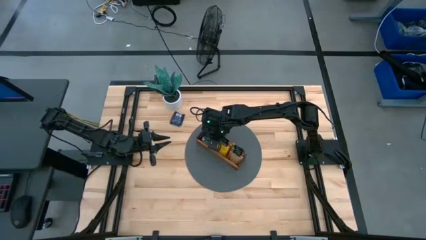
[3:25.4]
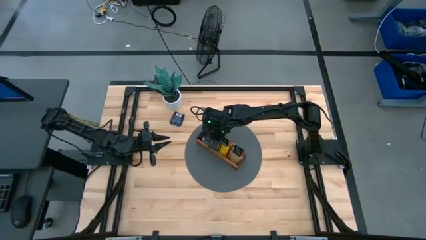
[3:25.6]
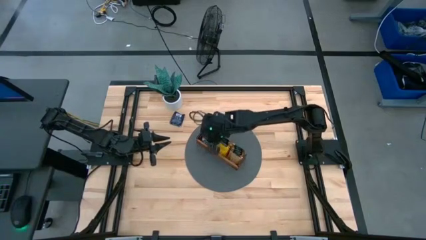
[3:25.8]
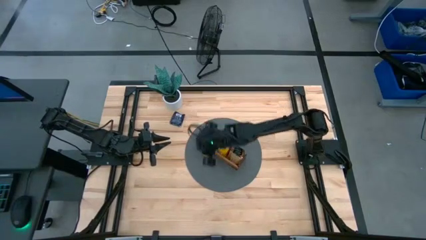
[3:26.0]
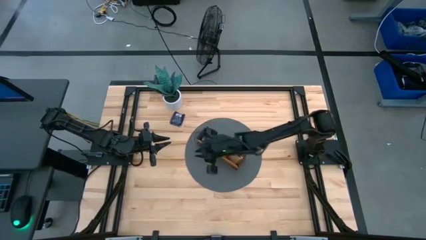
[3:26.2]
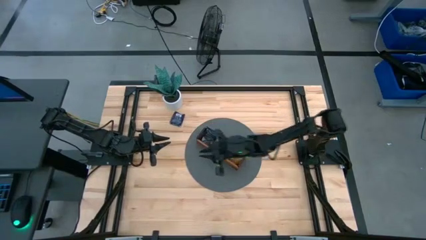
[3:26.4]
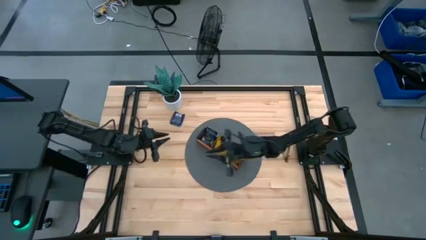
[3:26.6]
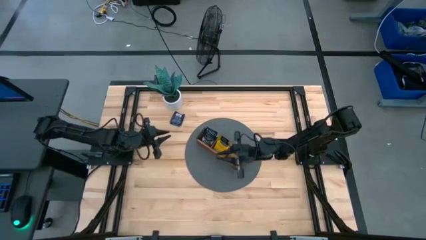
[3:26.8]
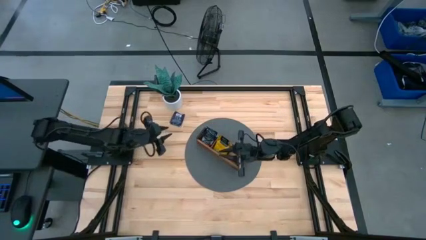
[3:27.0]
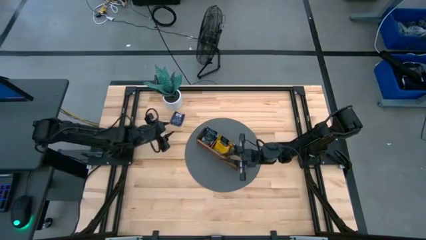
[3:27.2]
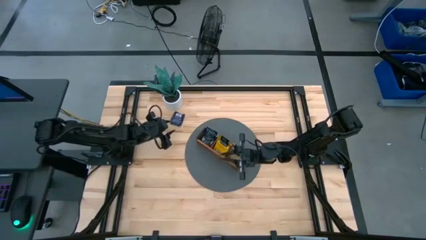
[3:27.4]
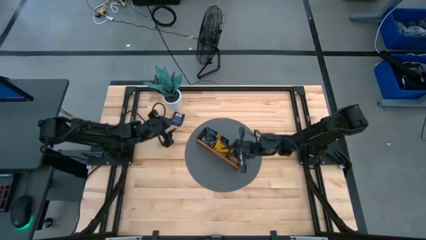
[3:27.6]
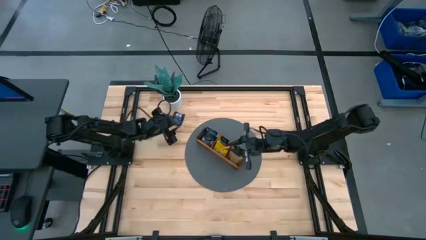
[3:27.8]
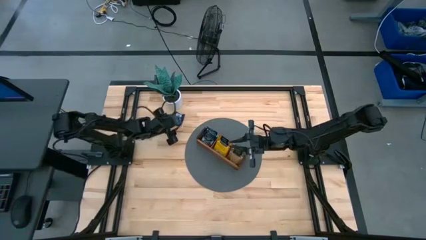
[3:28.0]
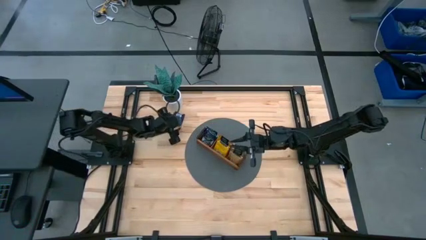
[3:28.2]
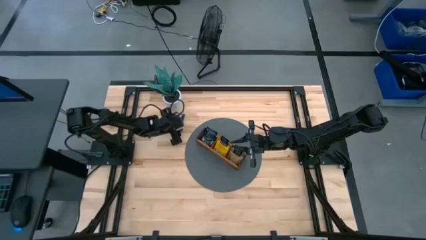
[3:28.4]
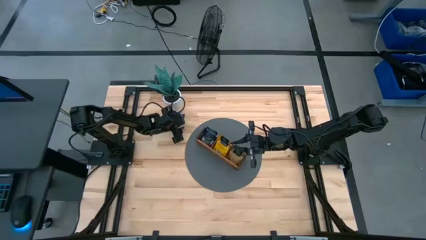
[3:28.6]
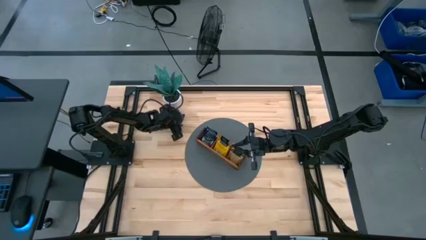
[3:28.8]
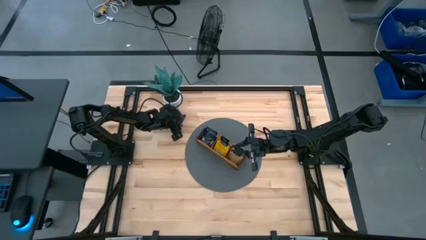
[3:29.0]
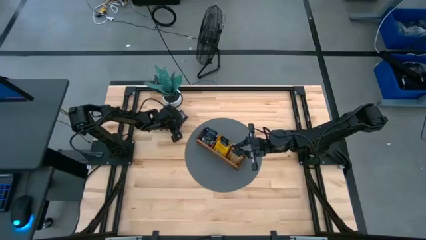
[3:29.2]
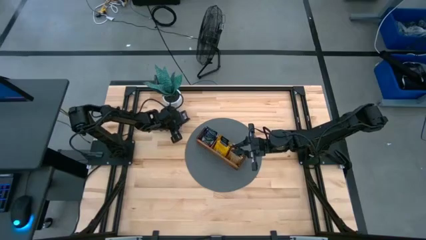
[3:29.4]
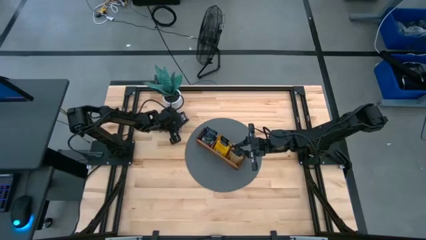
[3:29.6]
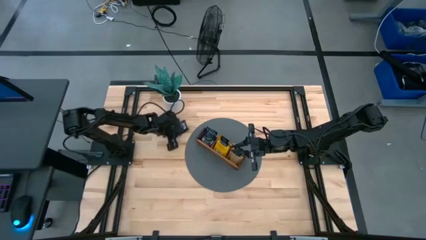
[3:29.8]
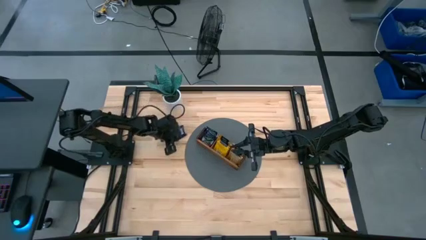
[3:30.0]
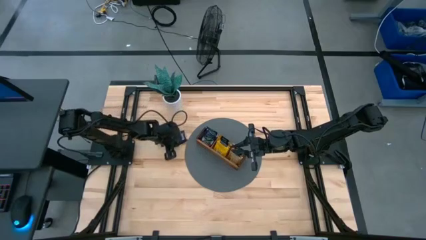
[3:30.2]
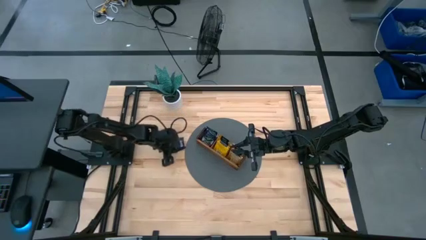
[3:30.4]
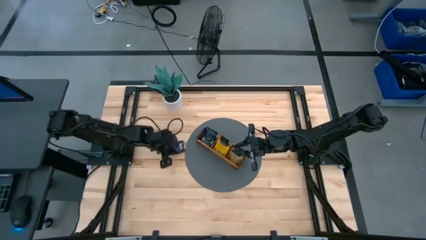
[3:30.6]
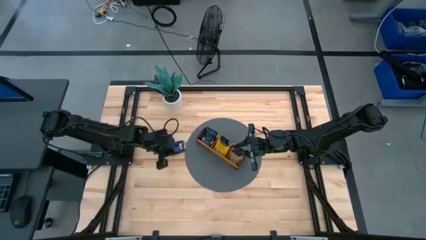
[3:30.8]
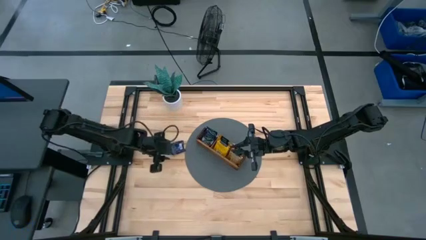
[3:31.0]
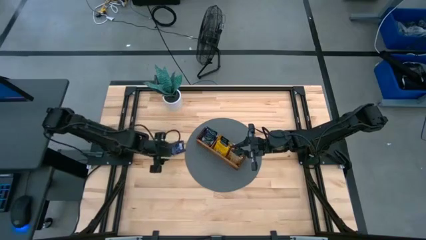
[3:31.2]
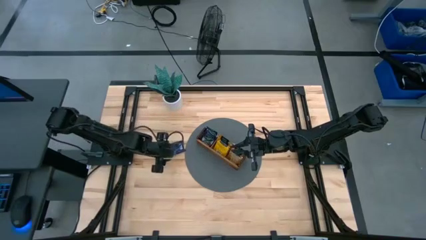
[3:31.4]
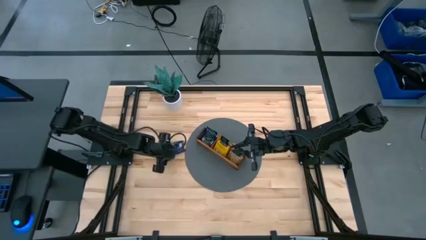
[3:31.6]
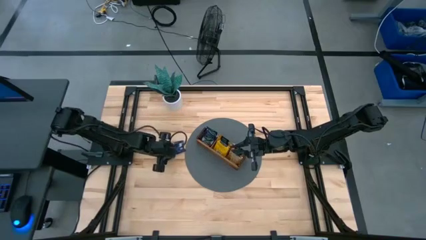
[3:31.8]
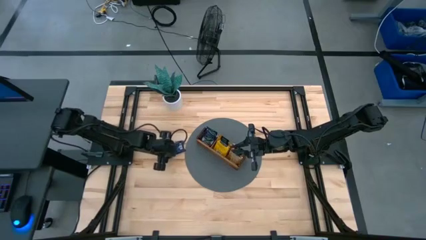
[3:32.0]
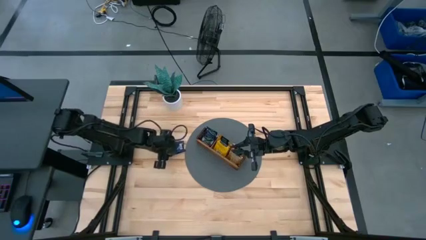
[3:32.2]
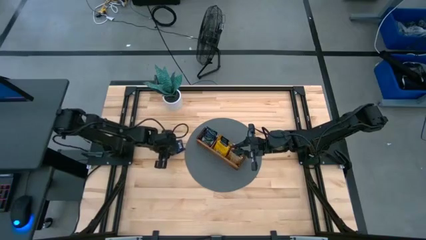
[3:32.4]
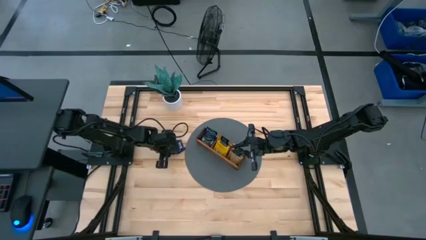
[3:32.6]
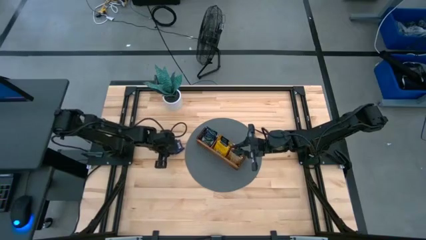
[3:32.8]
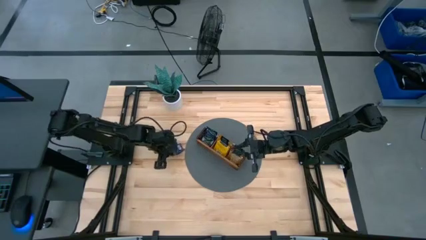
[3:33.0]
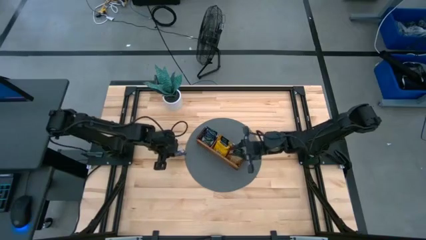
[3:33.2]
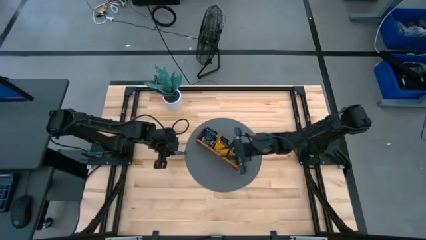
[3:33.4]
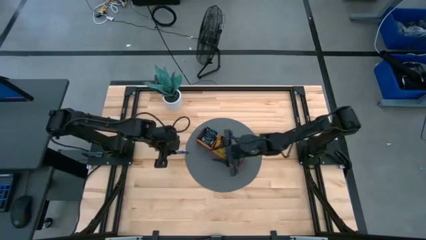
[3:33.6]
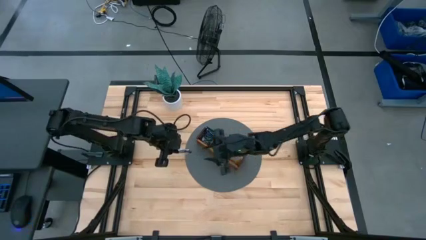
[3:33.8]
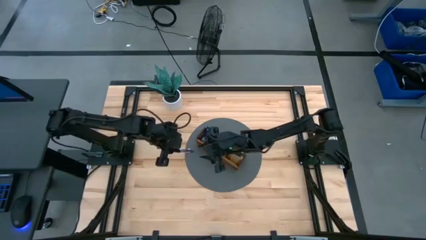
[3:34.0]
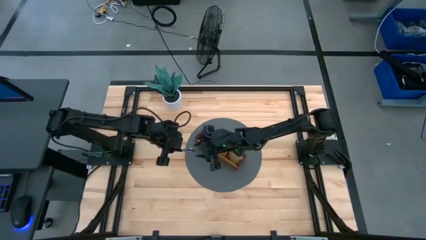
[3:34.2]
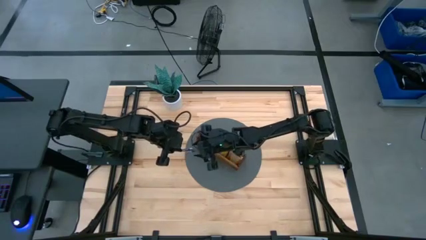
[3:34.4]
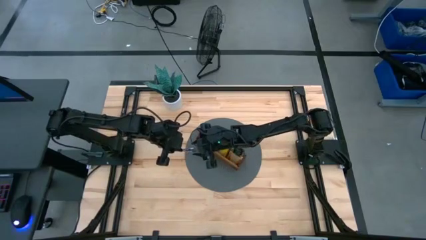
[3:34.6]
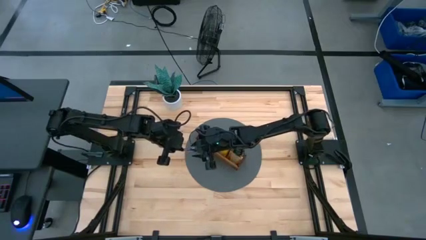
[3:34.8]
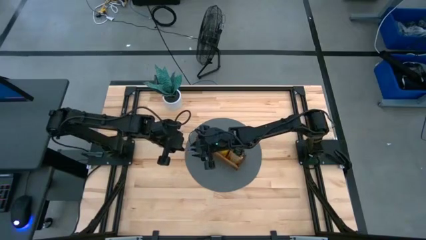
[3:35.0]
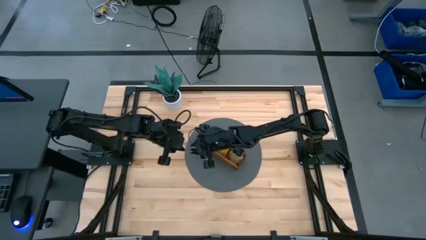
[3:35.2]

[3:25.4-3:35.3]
Task: Pick & Place Tea
Put the dark blue tea bag into the left section of the wooden organizer
